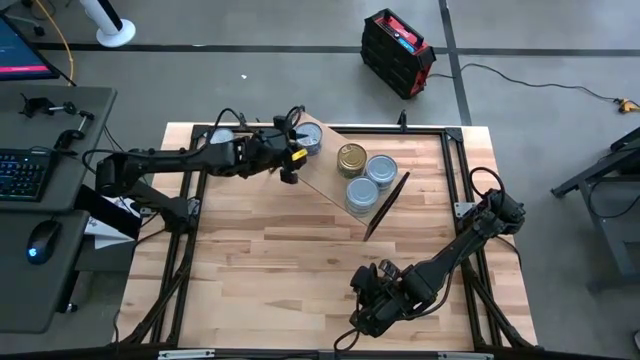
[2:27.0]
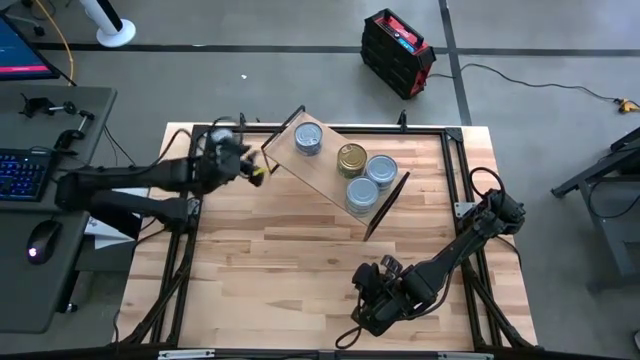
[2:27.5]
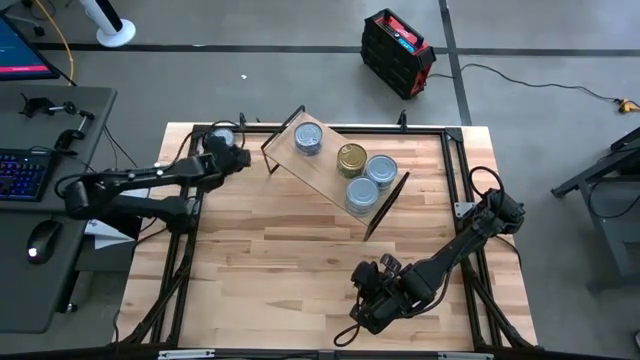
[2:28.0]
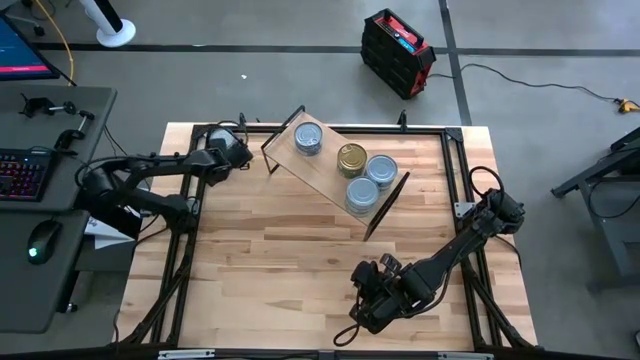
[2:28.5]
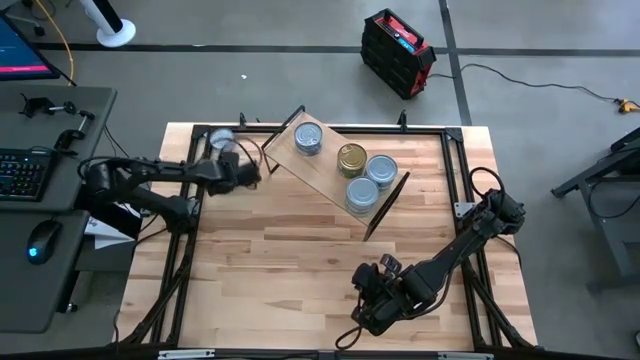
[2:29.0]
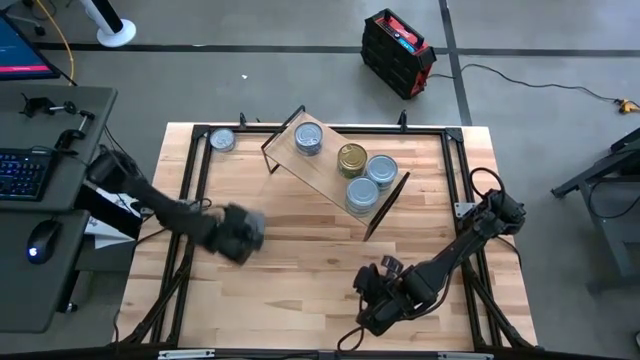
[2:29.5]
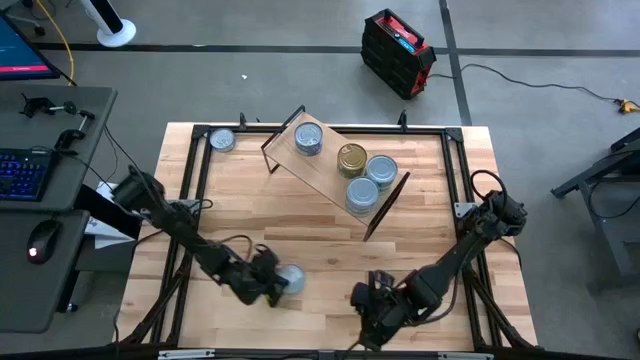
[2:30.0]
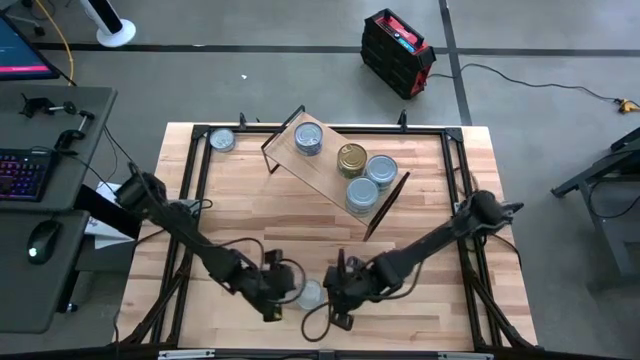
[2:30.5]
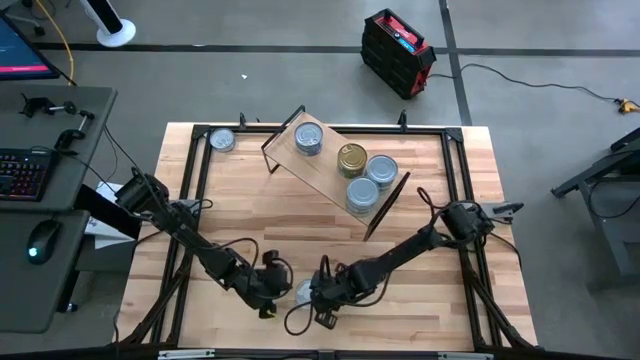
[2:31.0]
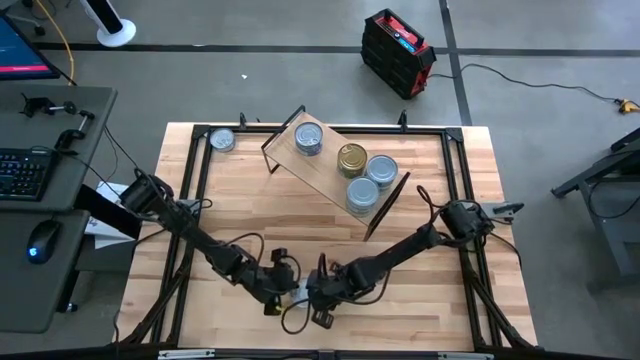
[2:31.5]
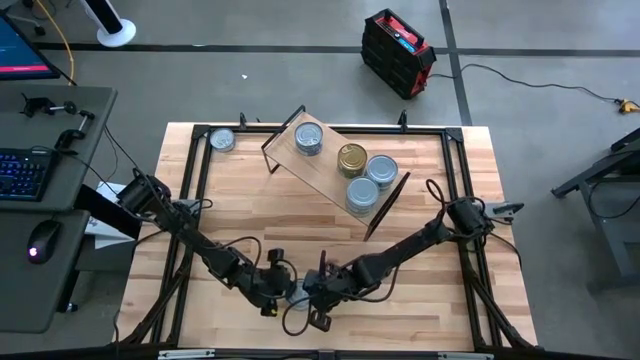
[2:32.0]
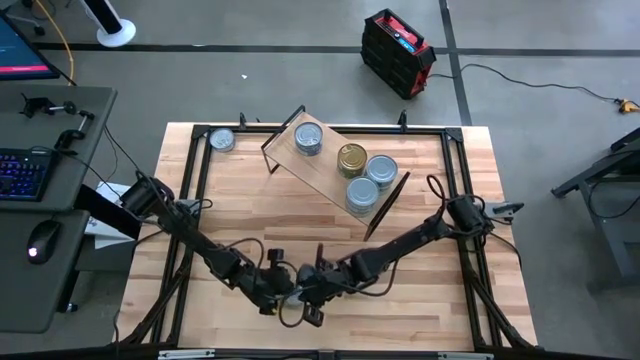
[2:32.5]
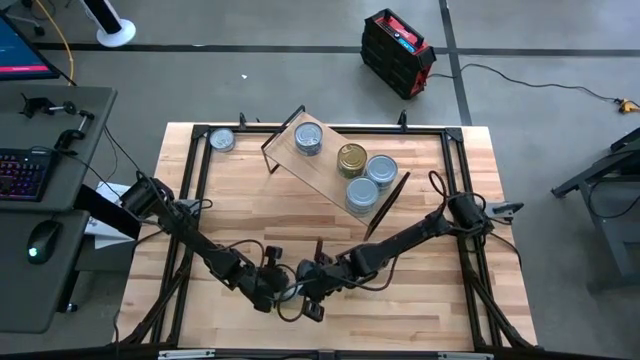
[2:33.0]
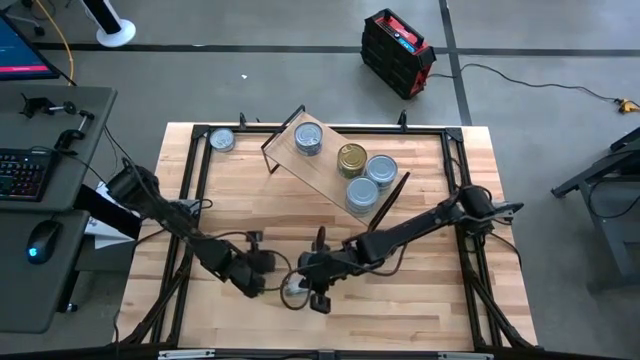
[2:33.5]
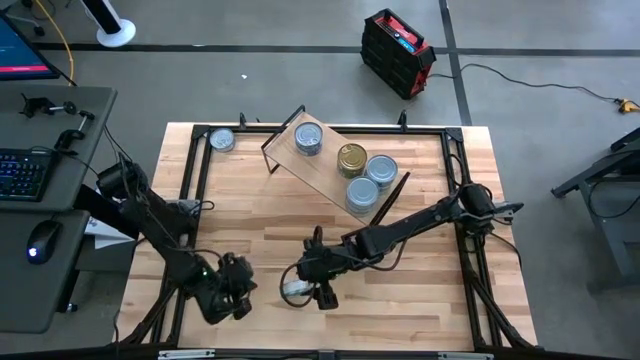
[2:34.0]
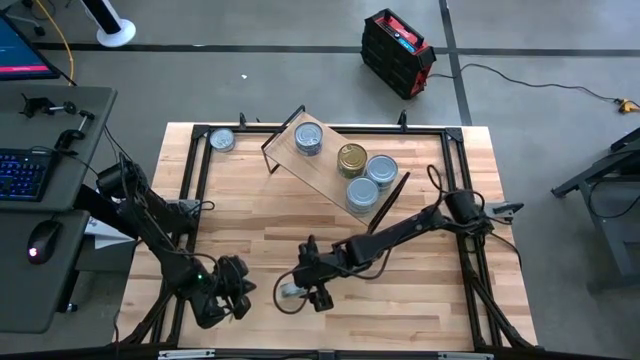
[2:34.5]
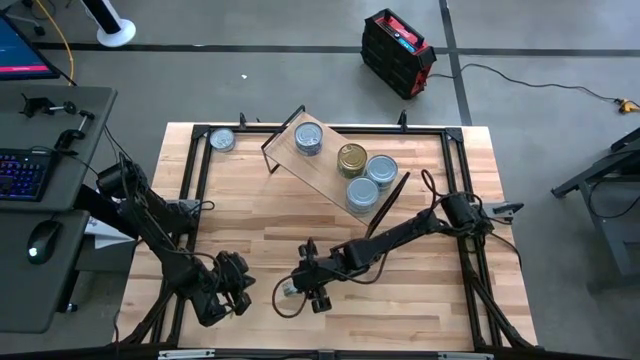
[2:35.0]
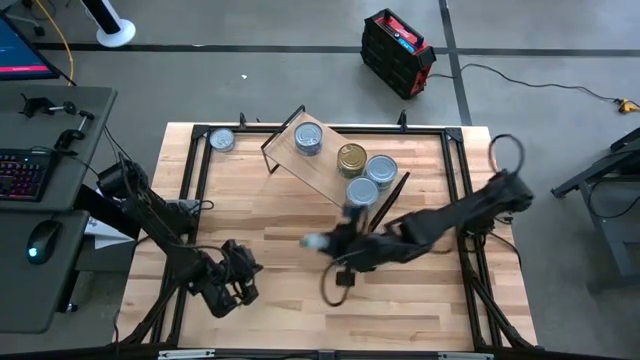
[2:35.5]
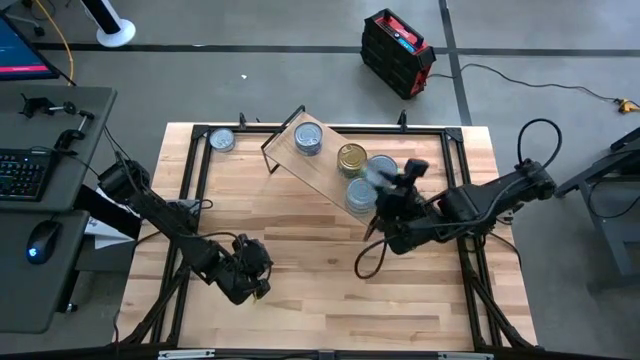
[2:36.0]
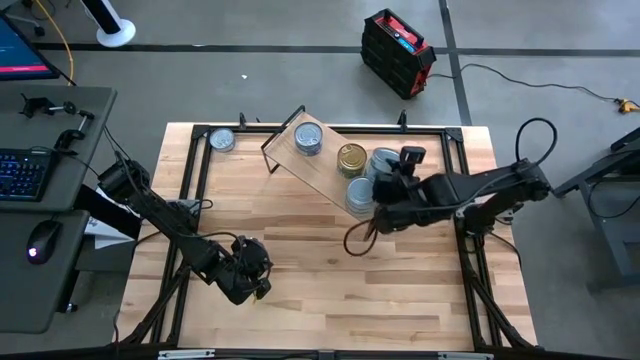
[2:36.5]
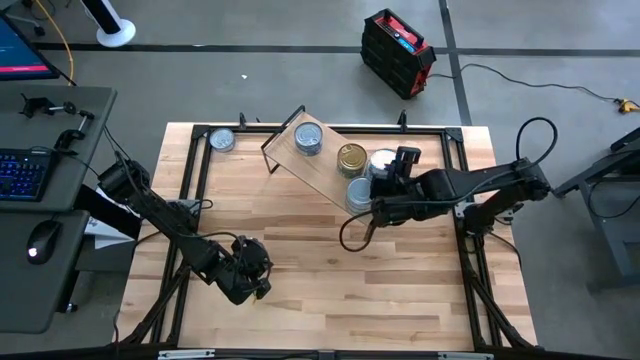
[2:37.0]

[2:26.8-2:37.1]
Task: Stack canned seafood by type on shelf
Stack the white-green tuna can on top of the other white-green tuna cans on the shelf

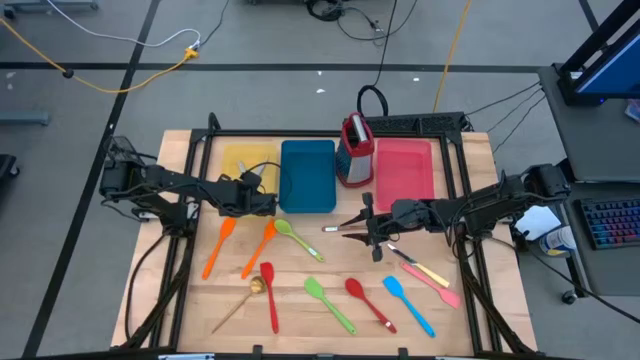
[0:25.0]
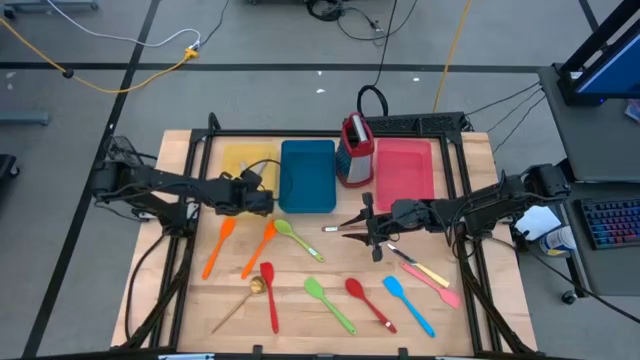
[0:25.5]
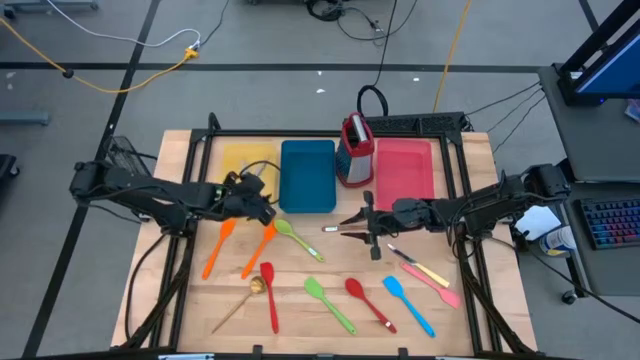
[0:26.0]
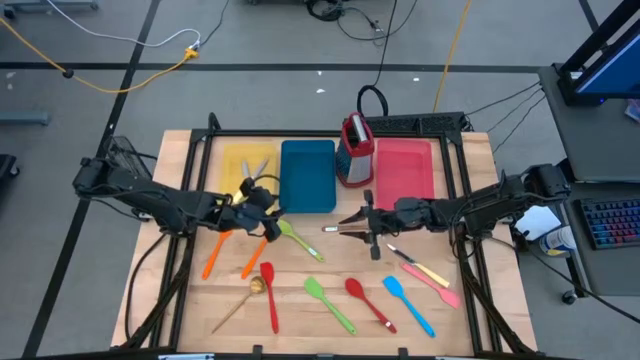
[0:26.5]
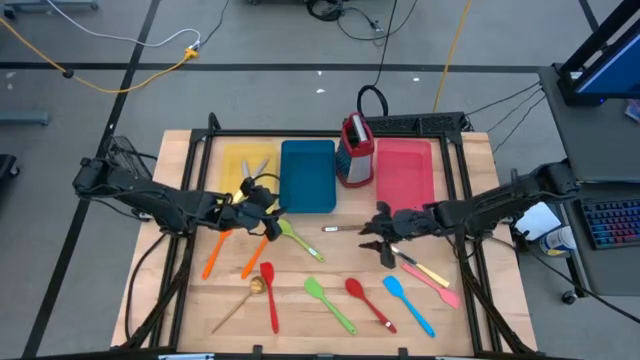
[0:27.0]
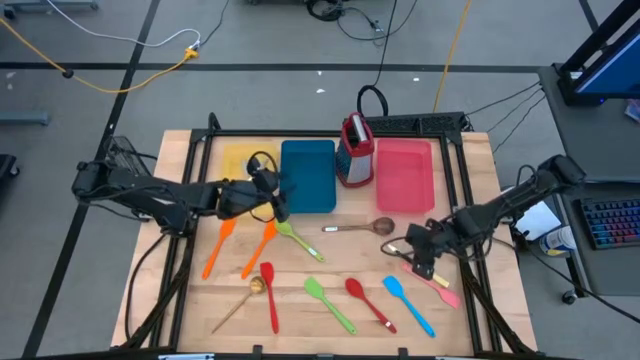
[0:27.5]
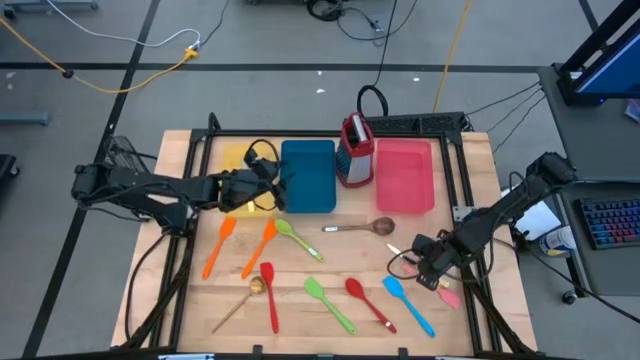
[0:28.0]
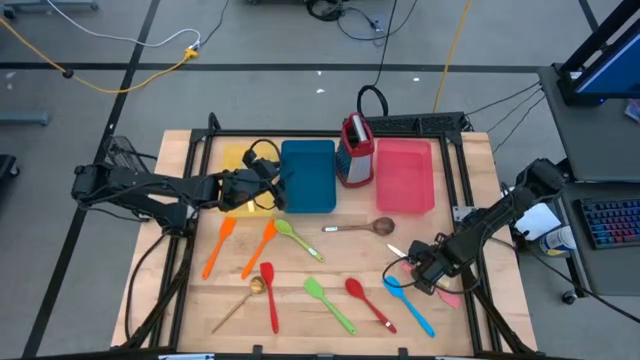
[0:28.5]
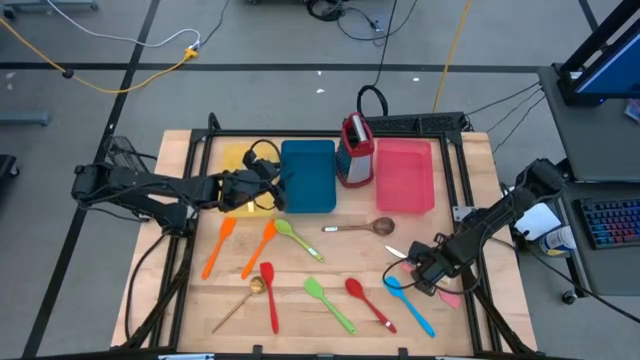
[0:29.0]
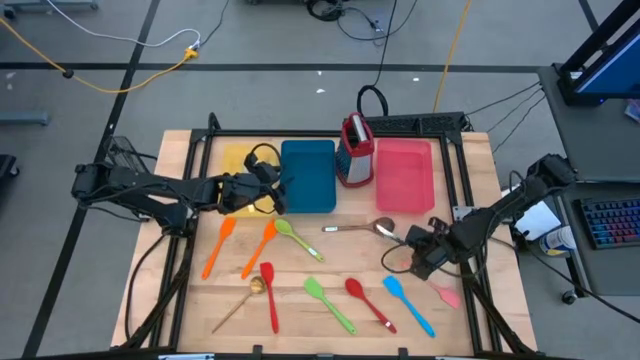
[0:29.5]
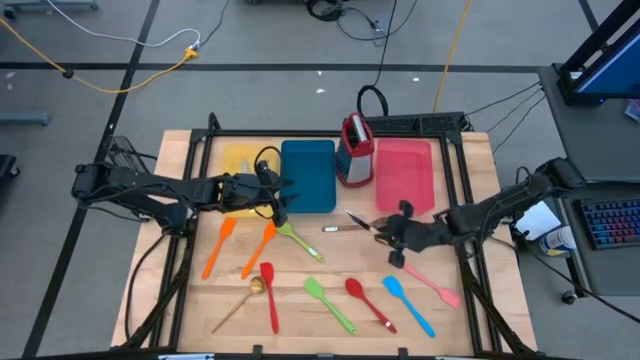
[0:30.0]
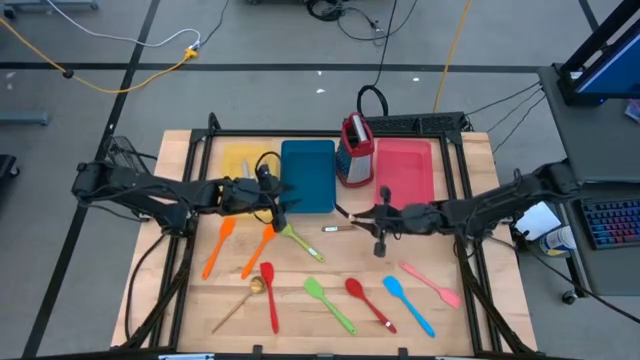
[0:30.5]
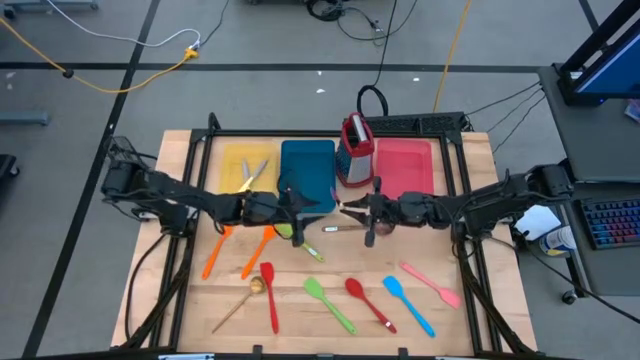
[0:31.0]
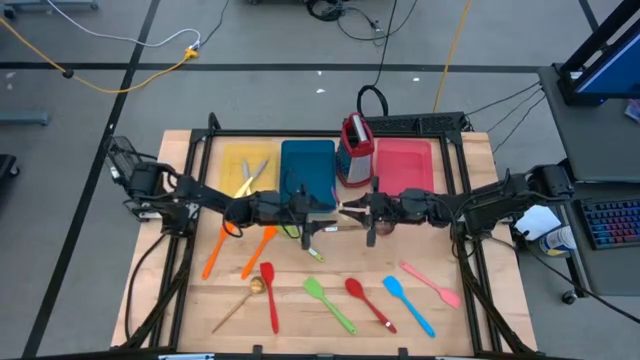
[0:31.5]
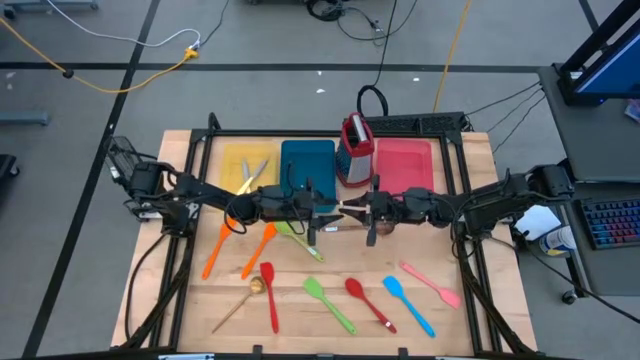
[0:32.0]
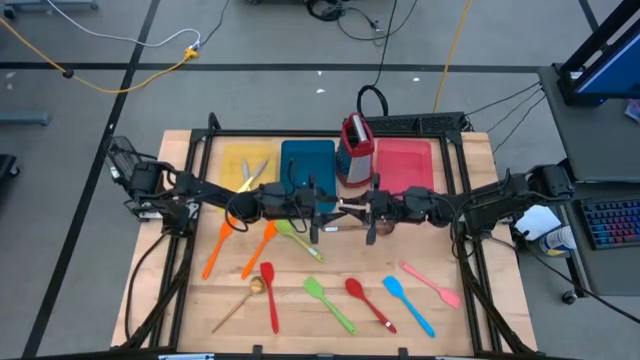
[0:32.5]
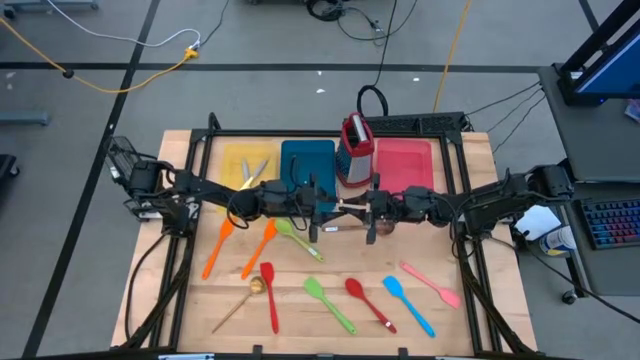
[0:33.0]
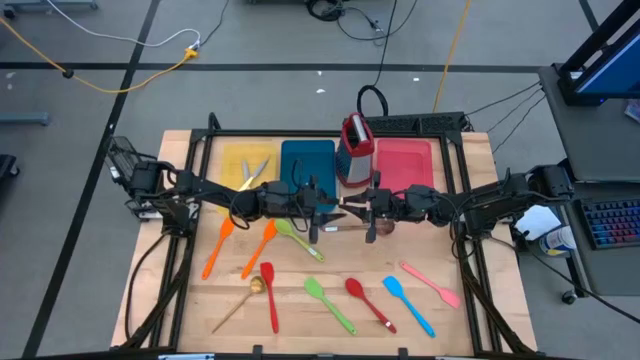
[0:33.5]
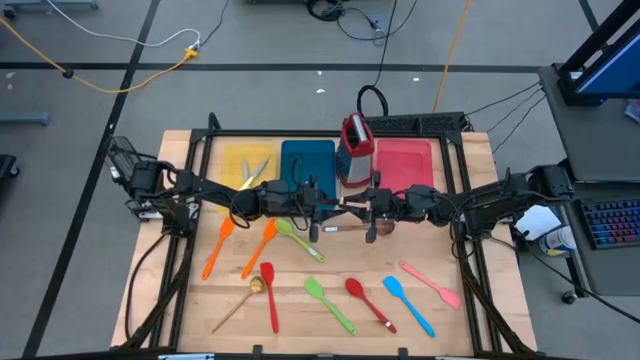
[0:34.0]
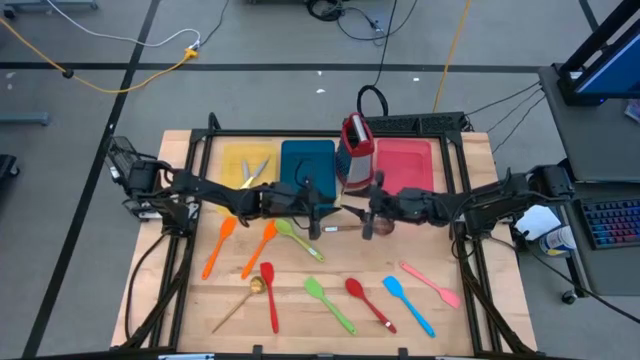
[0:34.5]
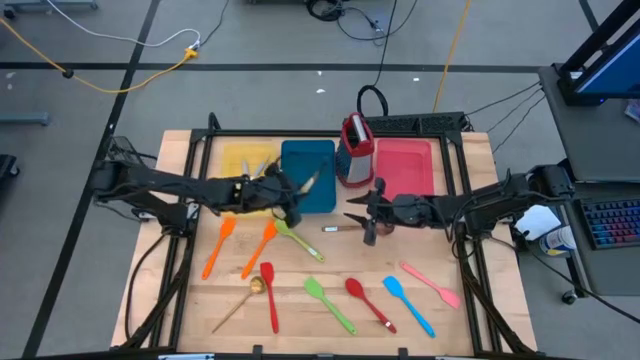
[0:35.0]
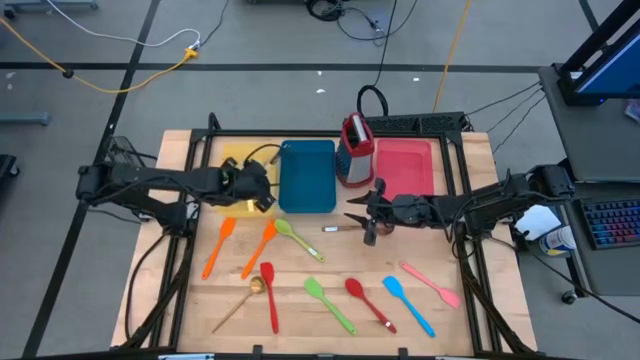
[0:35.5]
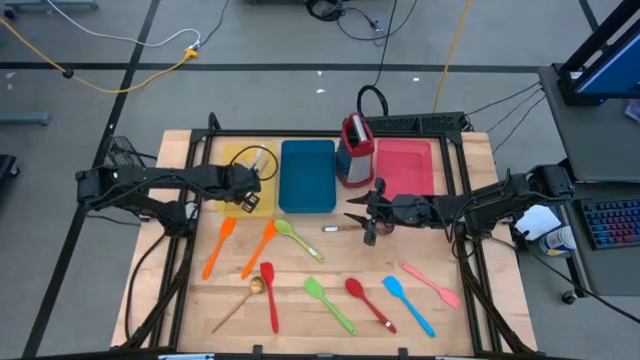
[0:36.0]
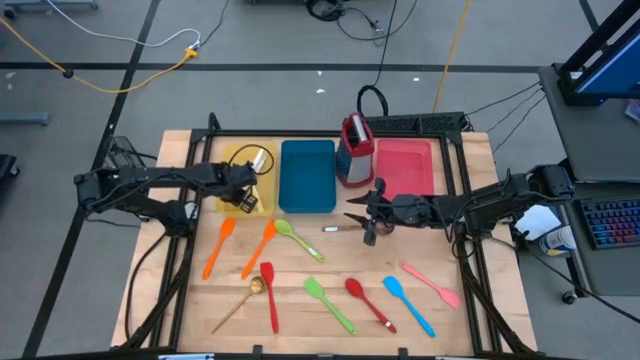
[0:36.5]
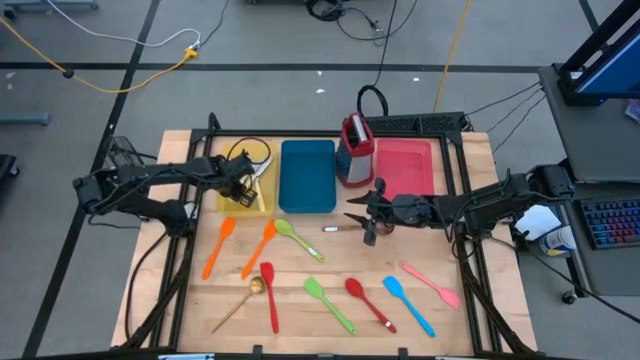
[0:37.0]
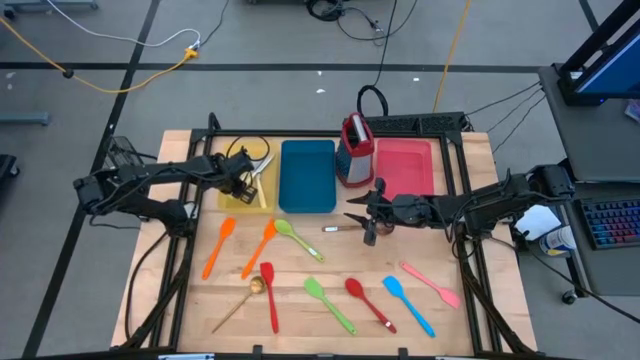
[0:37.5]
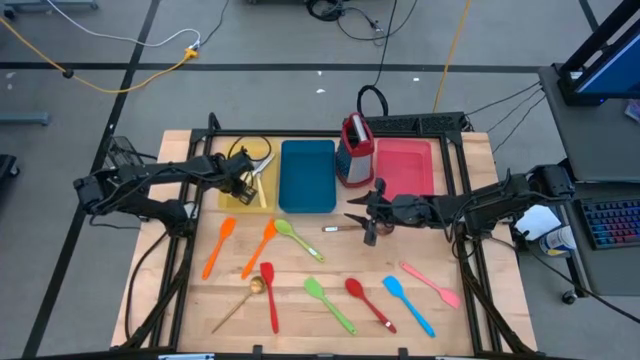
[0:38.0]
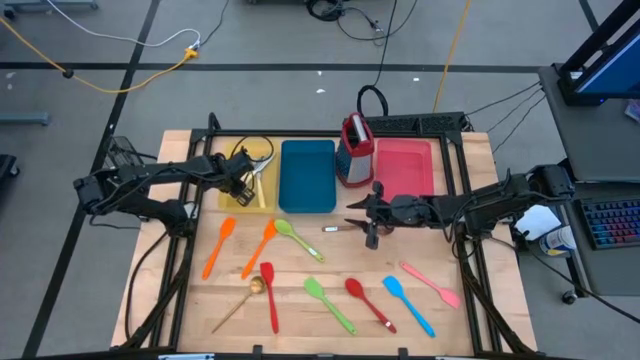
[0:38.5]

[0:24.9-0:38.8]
Task: Pick & Place Kitchen Items
Put the yellow table knife into the yellow bin
